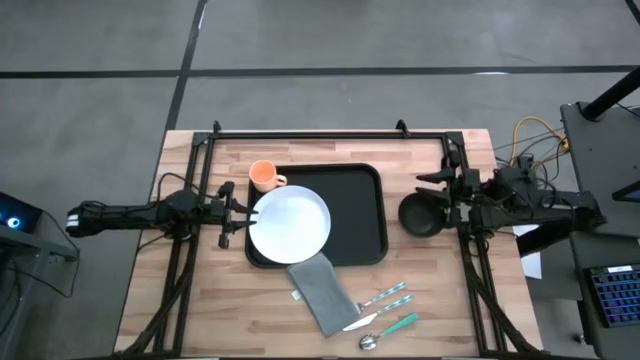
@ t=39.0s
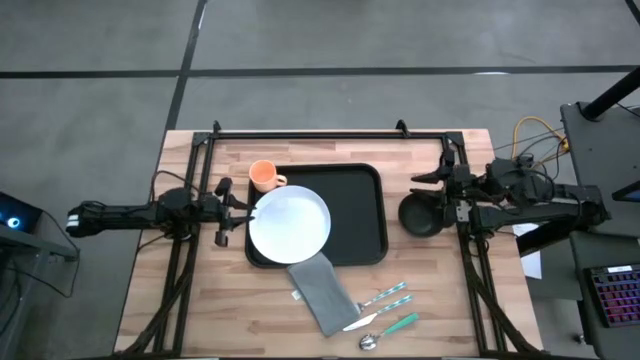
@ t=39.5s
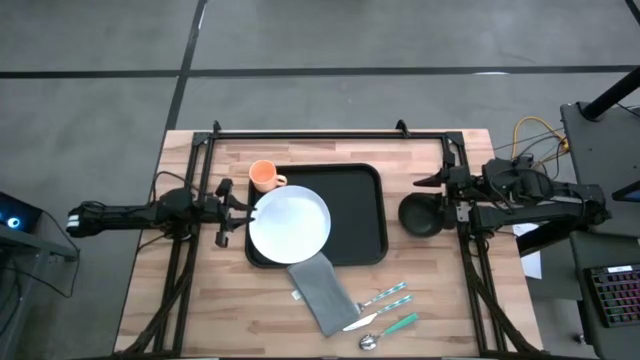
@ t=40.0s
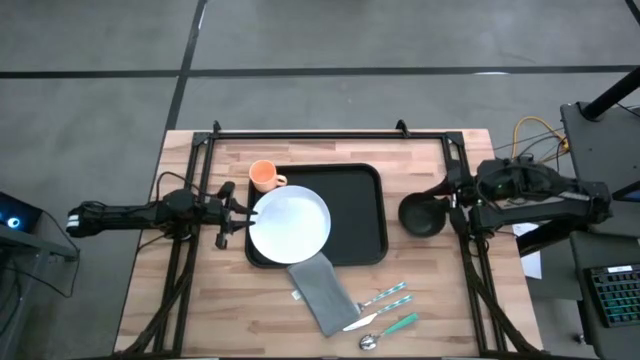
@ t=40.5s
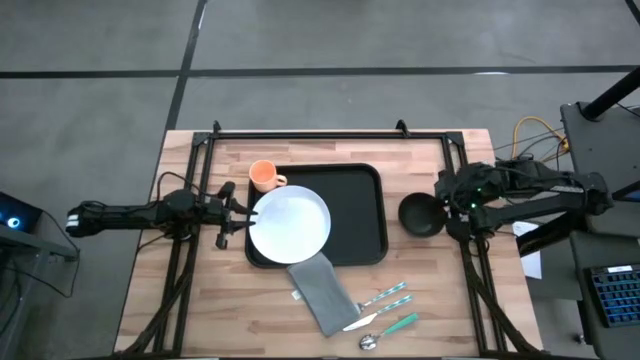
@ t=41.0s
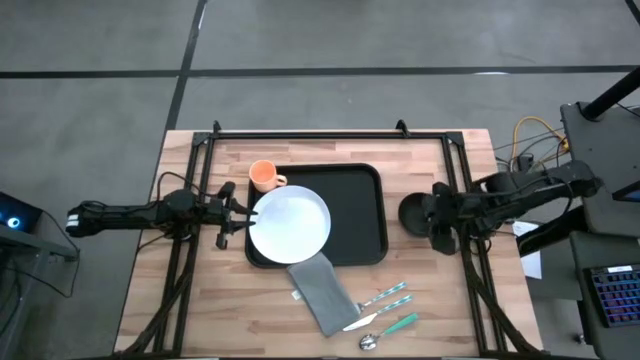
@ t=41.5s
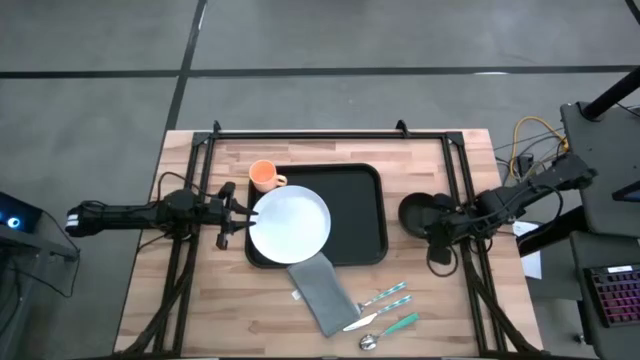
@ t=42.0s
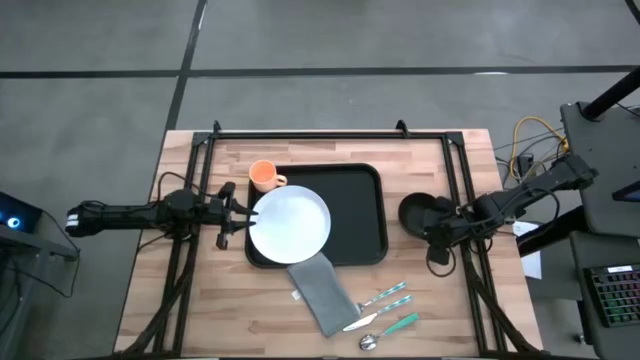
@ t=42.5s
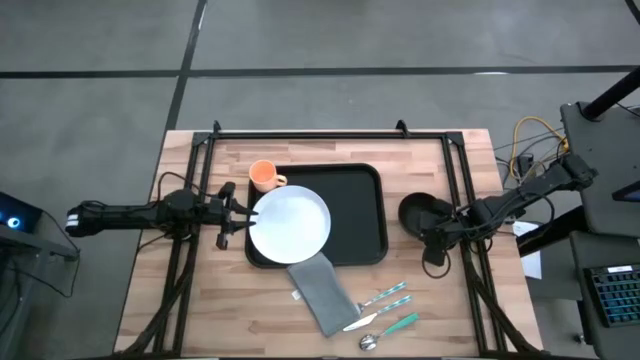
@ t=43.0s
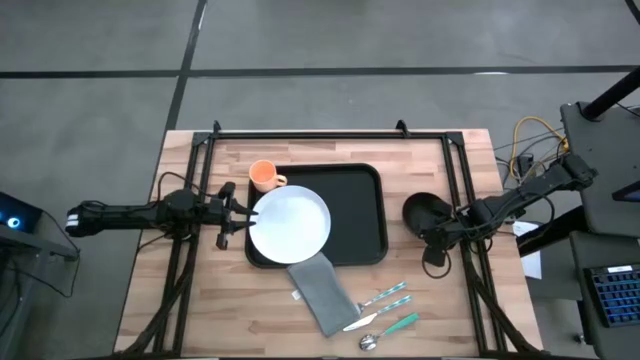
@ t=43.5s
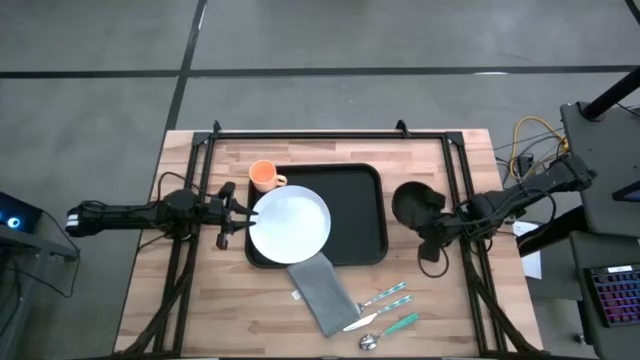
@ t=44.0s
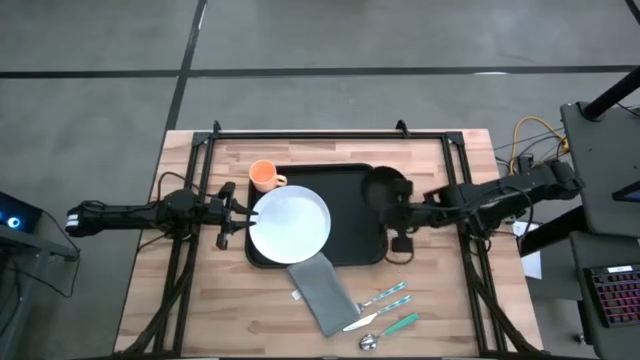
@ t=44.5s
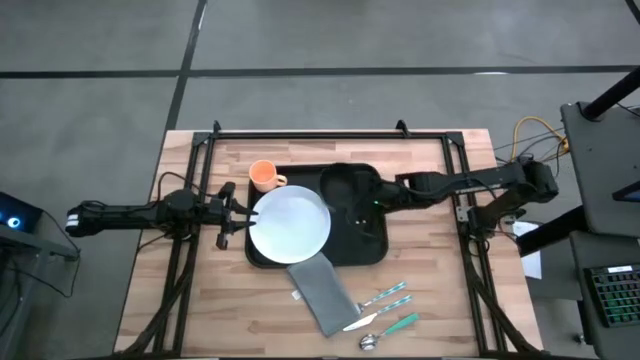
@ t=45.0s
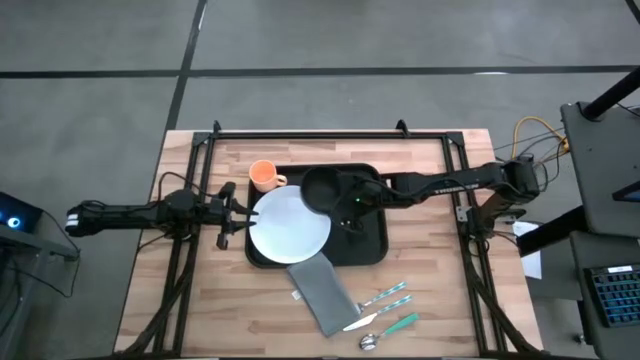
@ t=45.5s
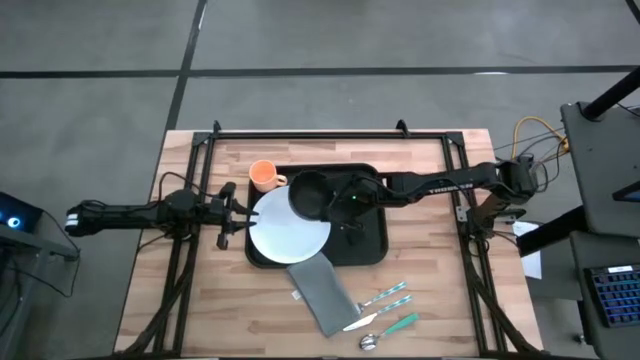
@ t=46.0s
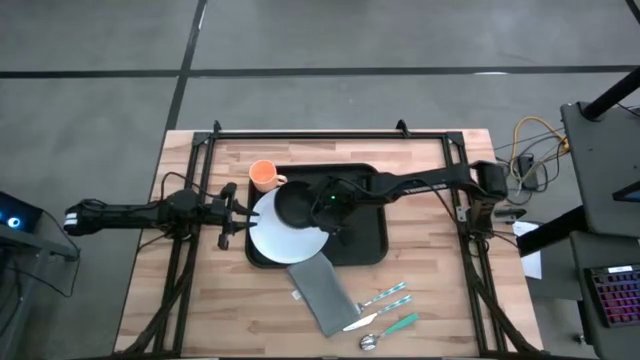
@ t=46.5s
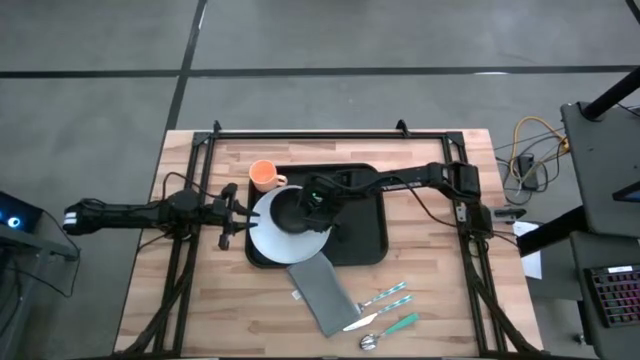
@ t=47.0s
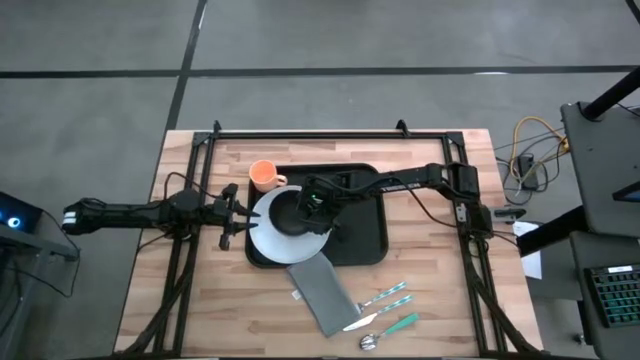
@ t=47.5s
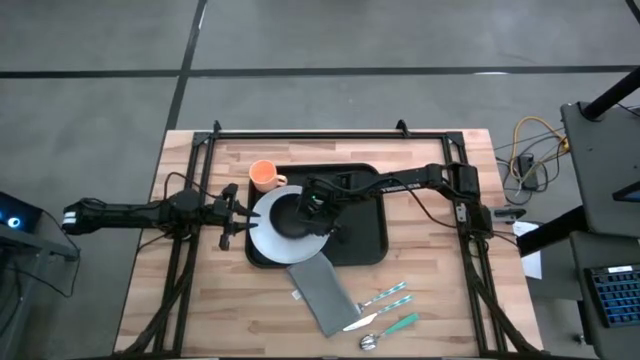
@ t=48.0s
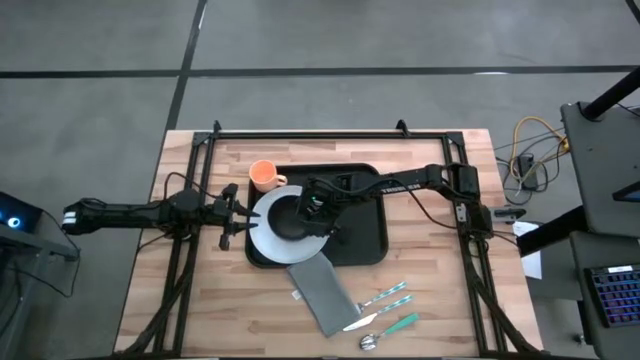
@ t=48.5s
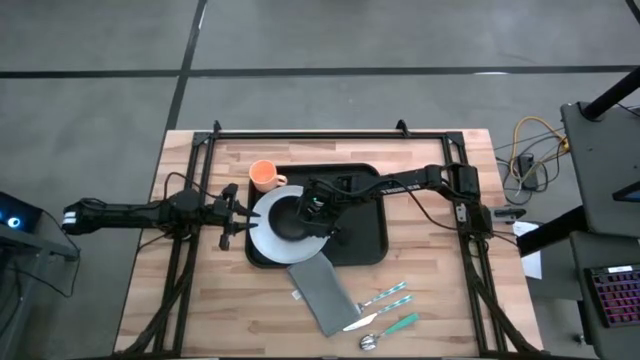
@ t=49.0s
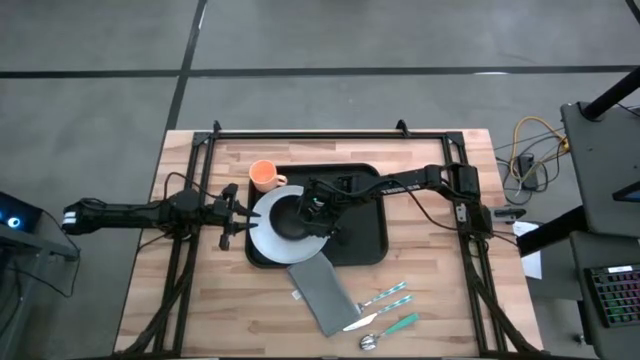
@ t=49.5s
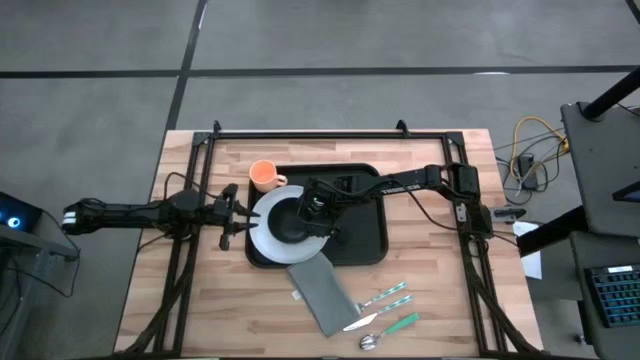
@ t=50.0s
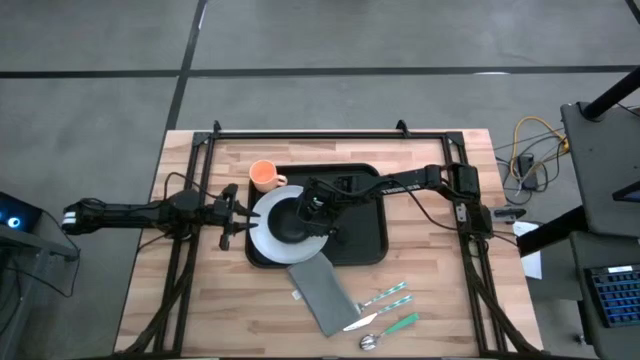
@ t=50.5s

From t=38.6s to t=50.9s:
Task: Set up tray
Put the black bowl on the white plate

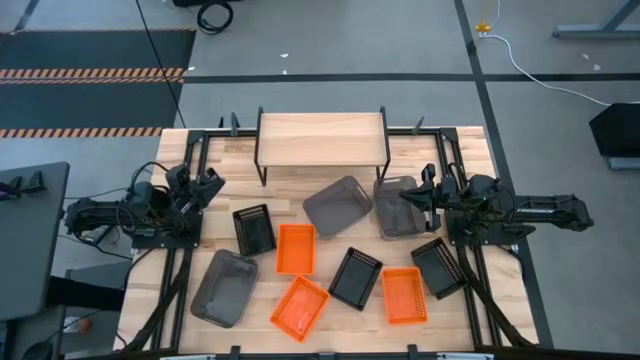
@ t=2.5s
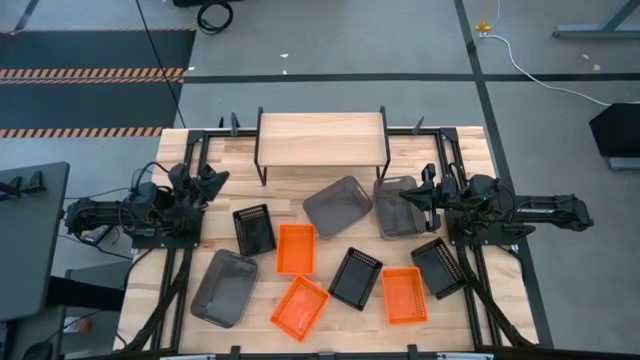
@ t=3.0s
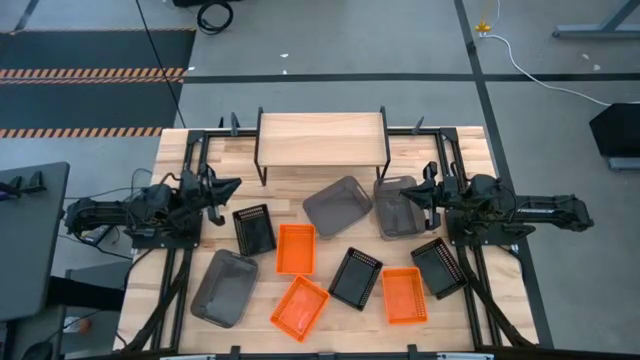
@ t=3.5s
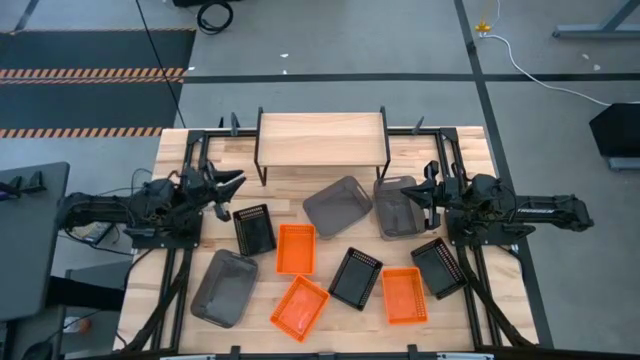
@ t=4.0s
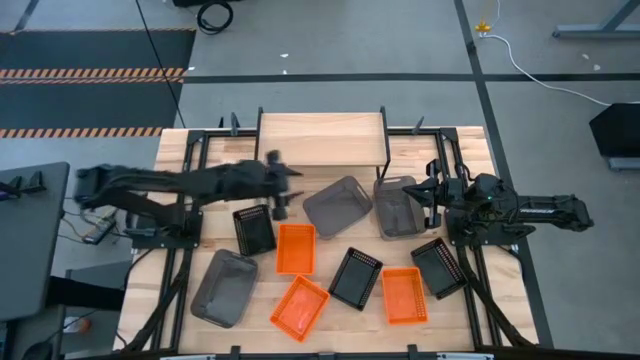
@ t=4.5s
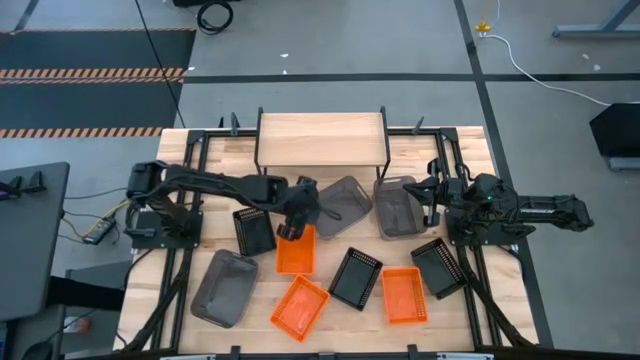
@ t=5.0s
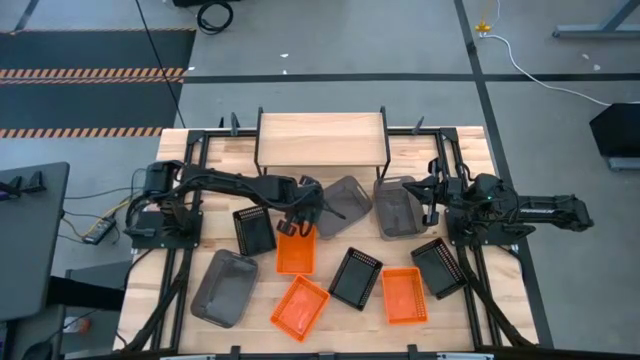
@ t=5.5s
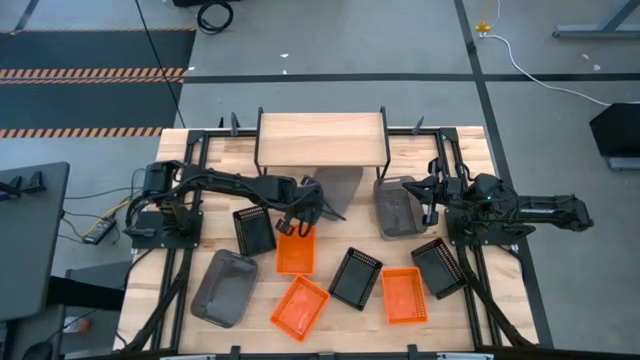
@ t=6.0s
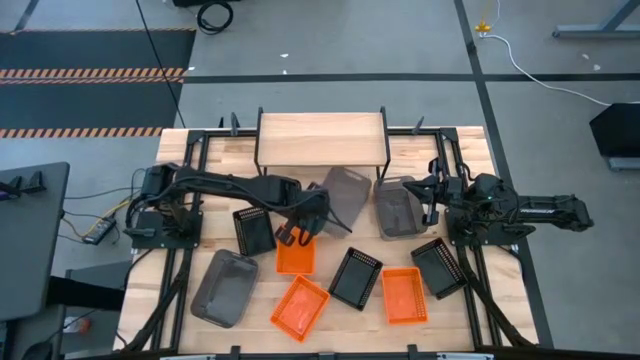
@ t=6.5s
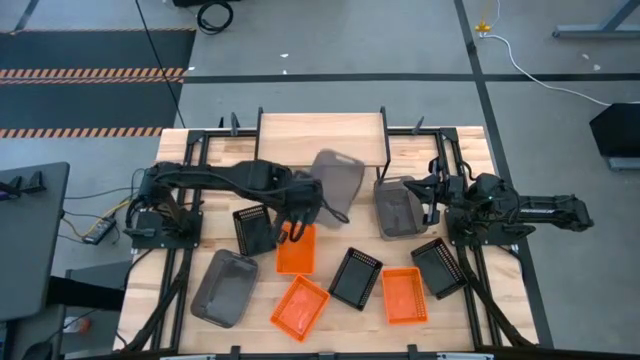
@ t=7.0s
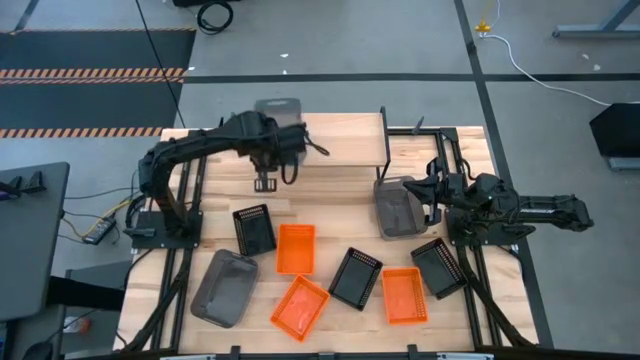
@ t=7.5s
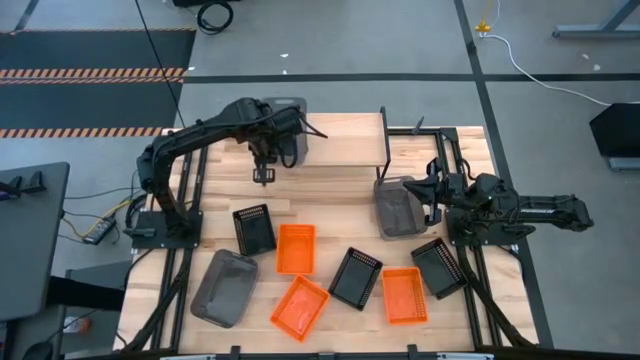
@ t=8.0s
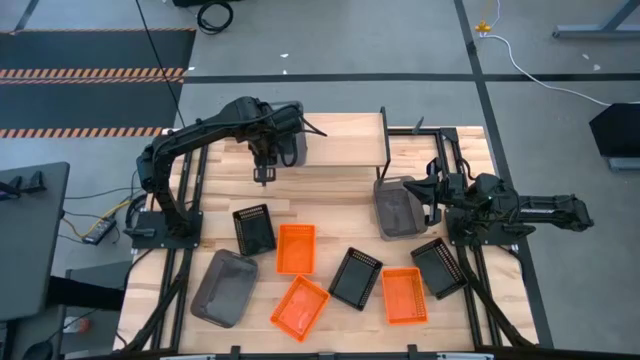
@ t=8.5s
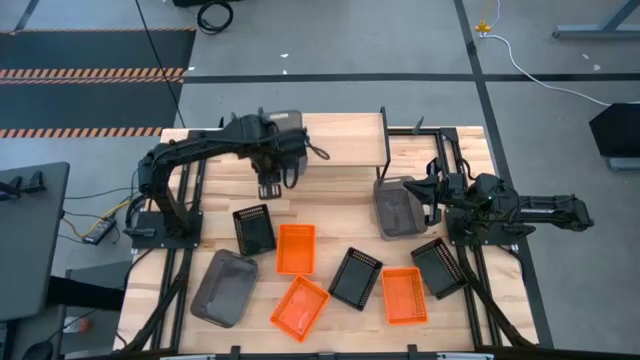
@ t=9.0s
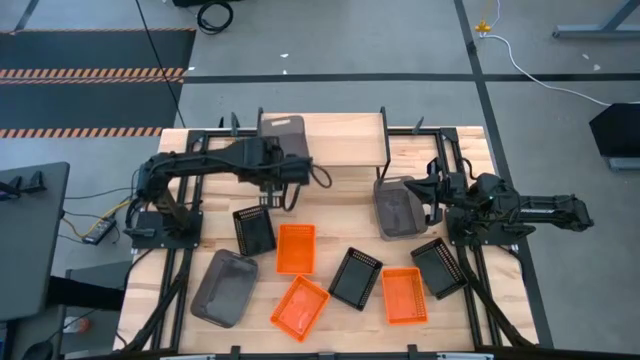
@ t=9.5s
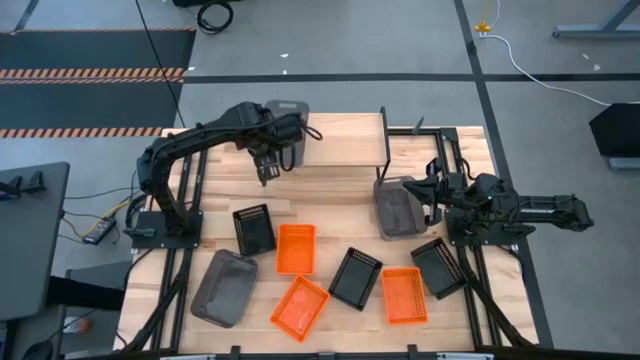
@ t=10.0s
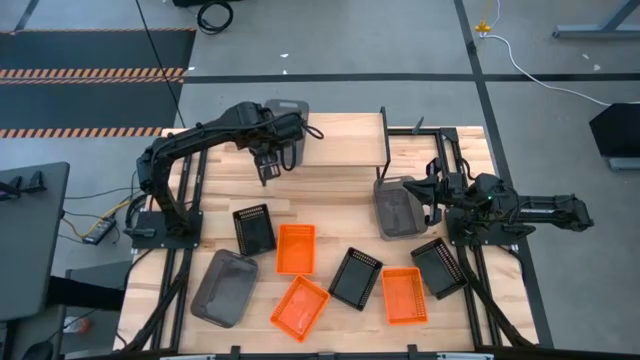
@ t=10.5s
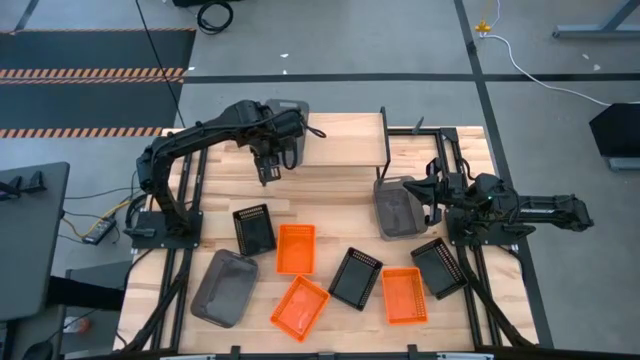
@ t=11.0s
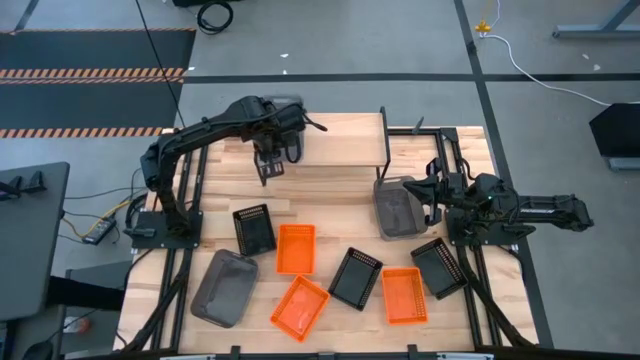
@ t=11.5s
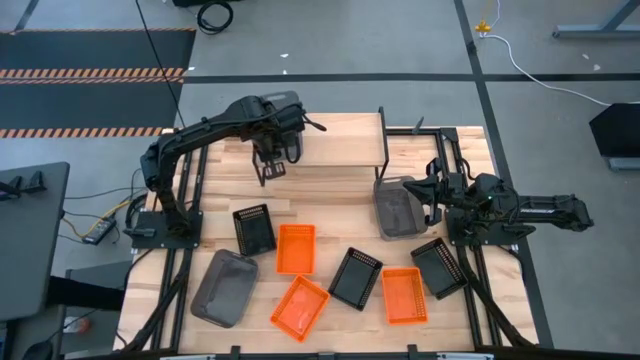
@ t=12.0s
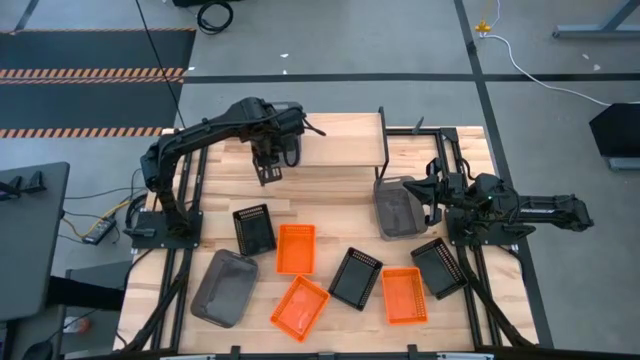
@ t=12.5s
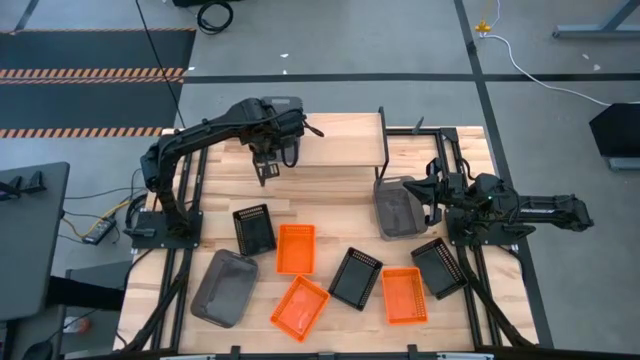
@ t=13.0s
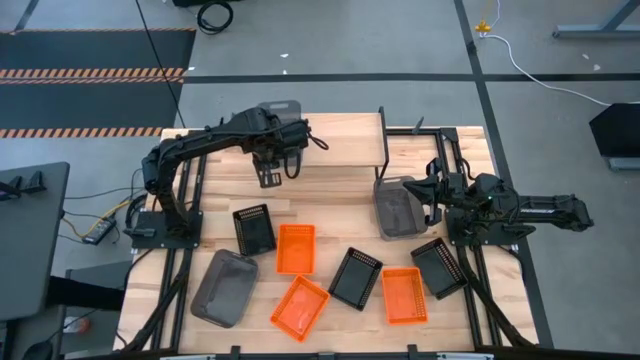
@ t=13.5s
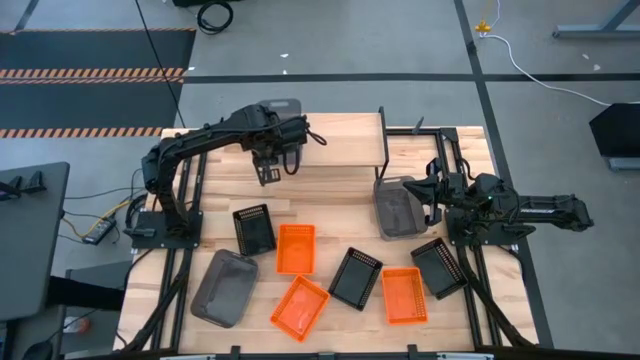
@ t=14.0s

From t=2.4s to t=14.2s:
Task: Stack baskets on shelf by color
Put the top left black bin on the shelf
